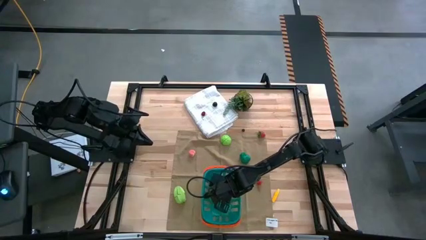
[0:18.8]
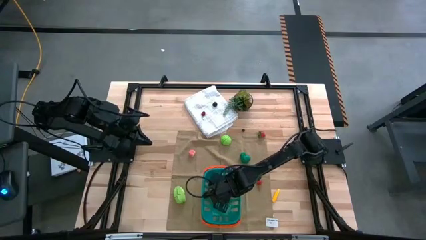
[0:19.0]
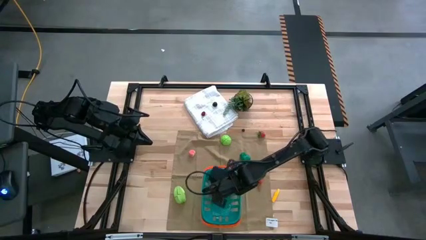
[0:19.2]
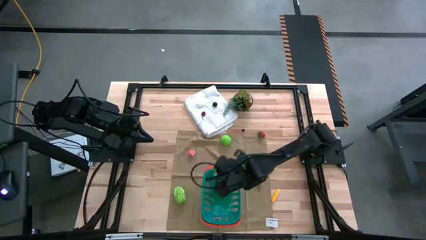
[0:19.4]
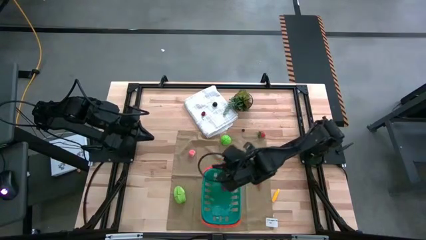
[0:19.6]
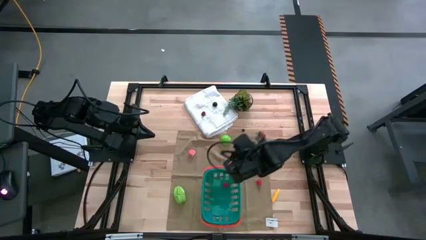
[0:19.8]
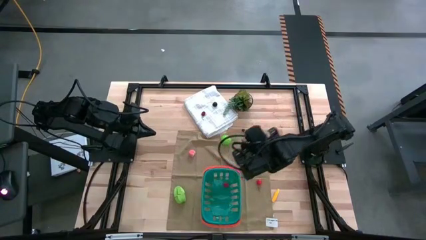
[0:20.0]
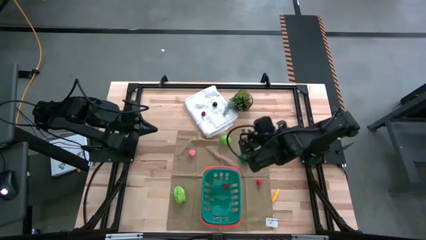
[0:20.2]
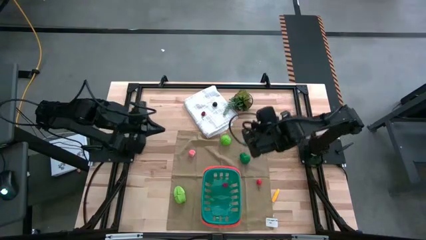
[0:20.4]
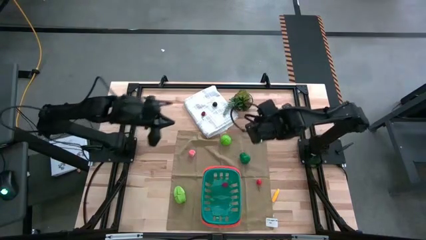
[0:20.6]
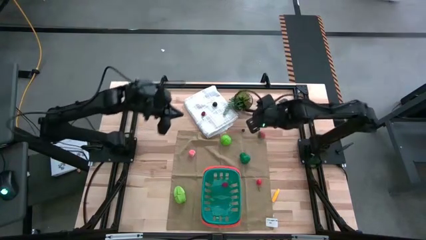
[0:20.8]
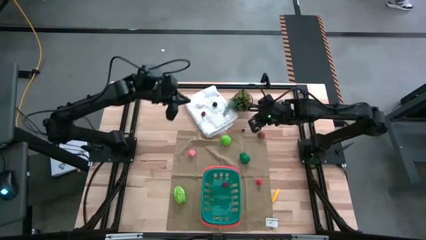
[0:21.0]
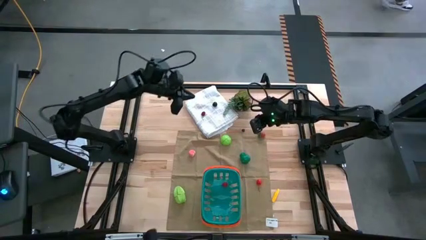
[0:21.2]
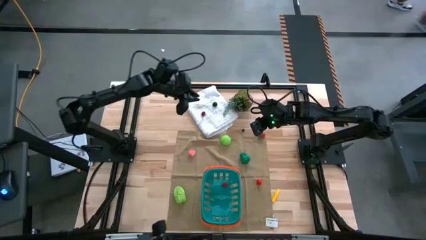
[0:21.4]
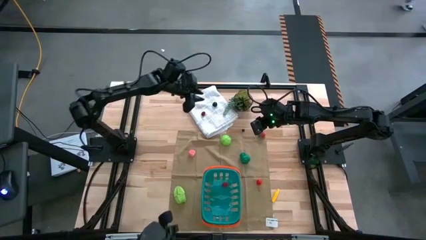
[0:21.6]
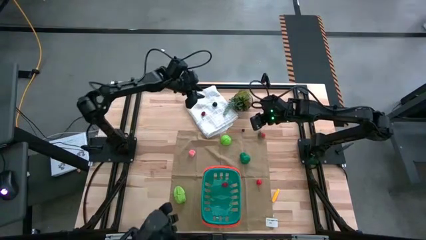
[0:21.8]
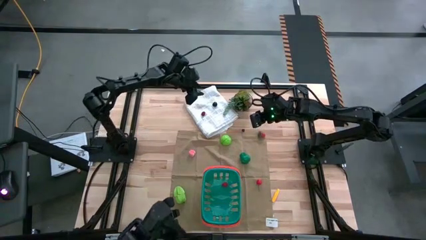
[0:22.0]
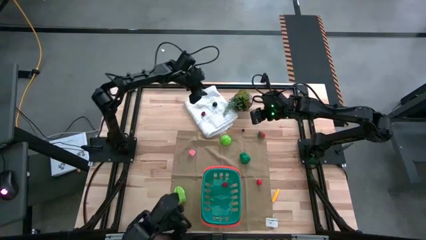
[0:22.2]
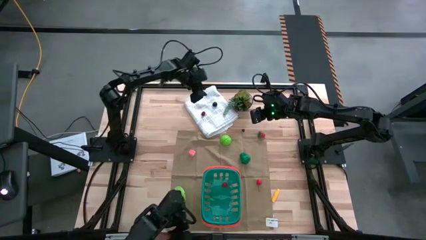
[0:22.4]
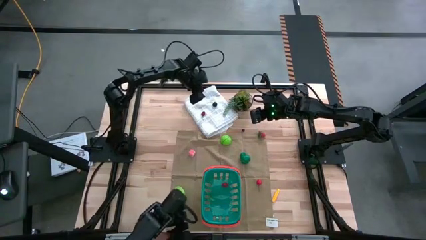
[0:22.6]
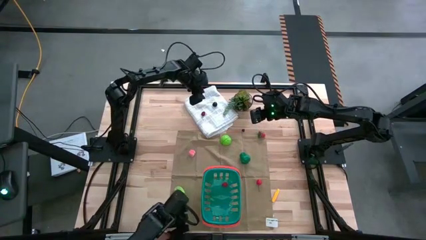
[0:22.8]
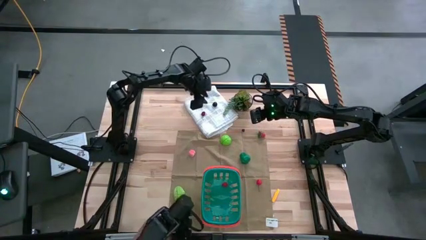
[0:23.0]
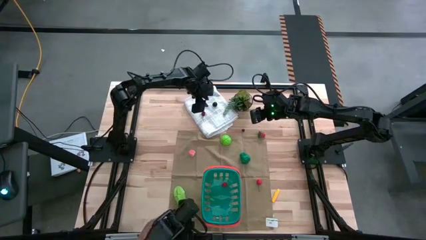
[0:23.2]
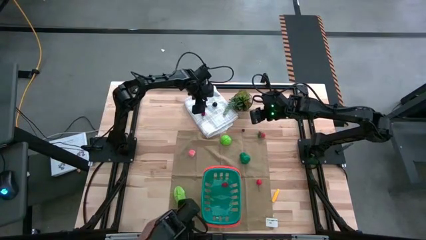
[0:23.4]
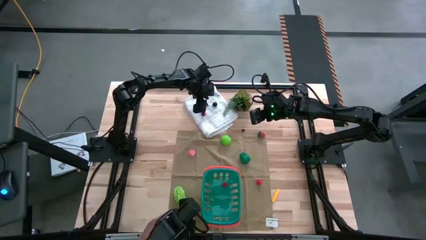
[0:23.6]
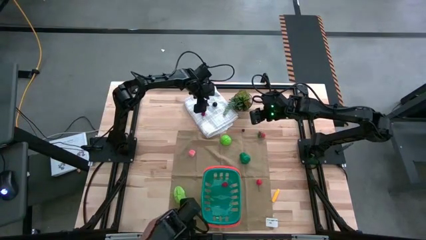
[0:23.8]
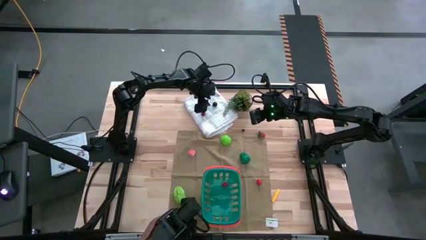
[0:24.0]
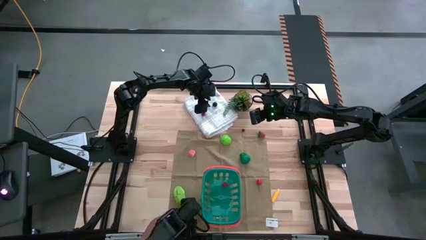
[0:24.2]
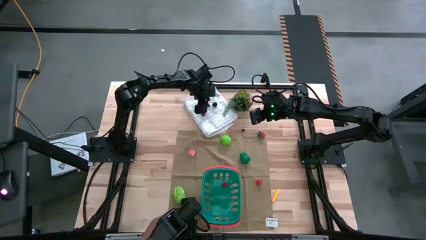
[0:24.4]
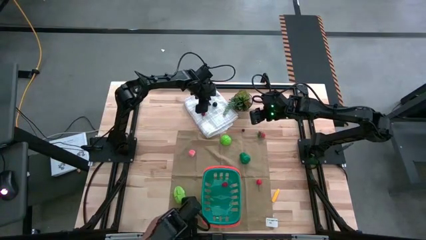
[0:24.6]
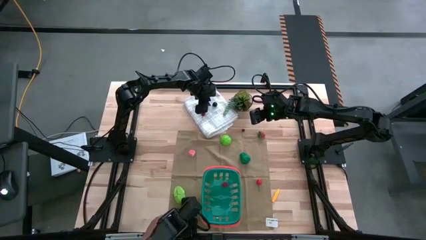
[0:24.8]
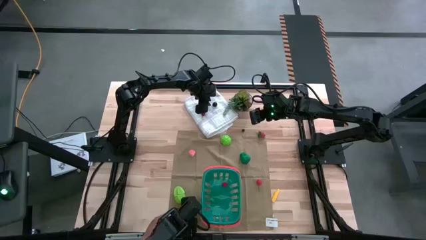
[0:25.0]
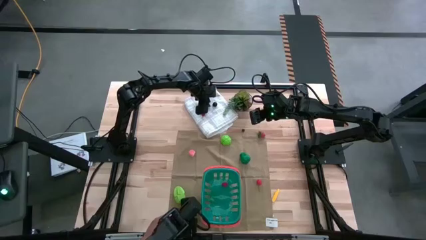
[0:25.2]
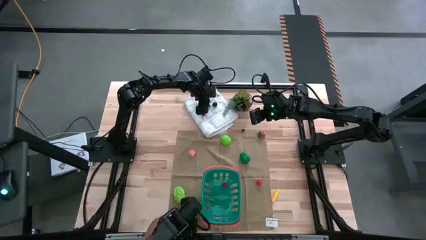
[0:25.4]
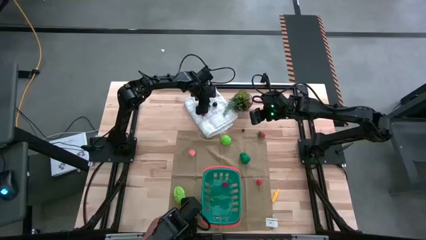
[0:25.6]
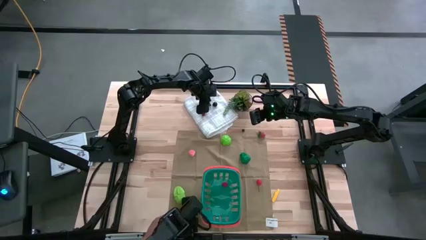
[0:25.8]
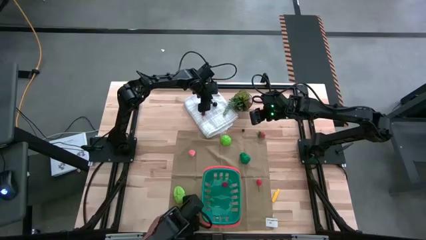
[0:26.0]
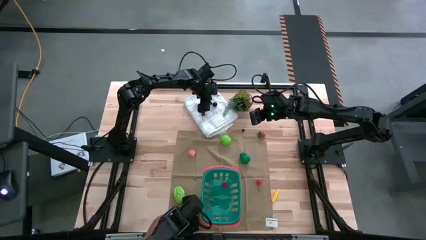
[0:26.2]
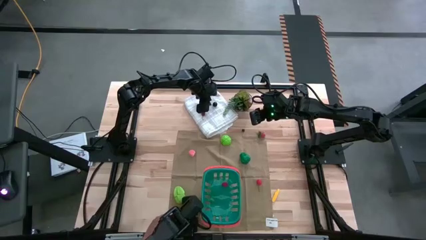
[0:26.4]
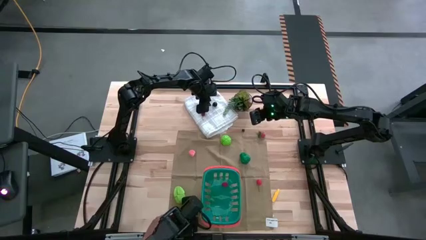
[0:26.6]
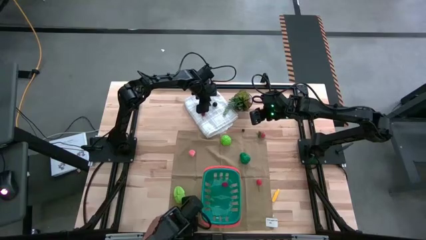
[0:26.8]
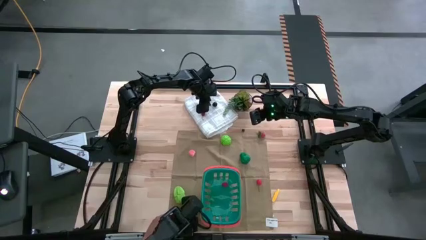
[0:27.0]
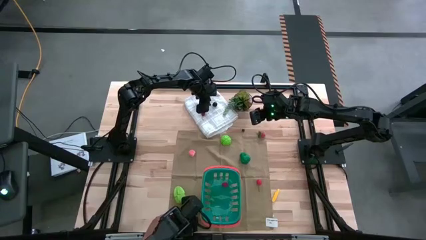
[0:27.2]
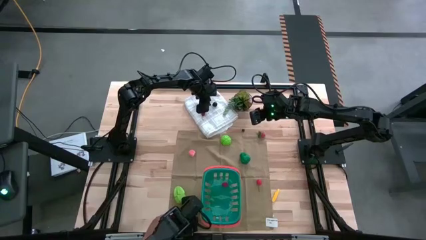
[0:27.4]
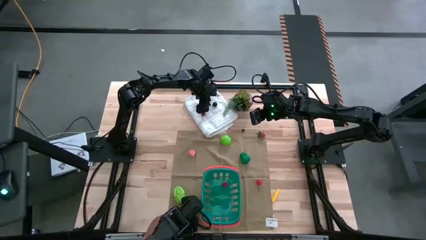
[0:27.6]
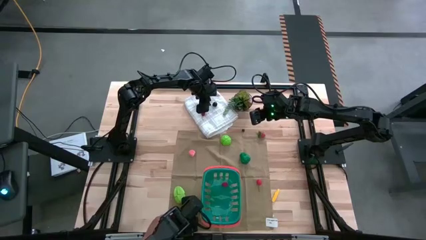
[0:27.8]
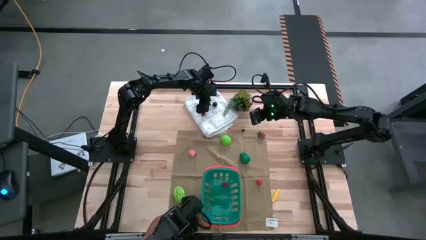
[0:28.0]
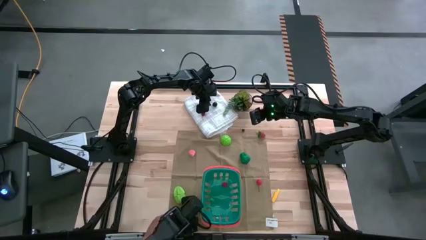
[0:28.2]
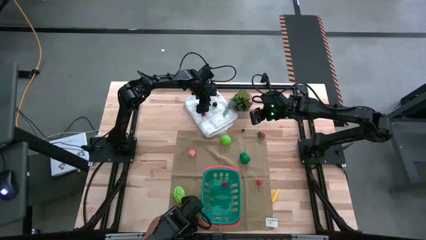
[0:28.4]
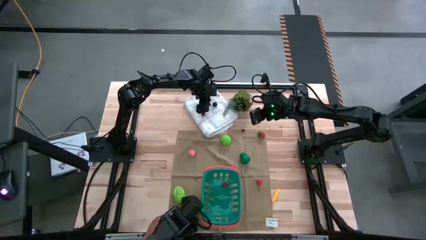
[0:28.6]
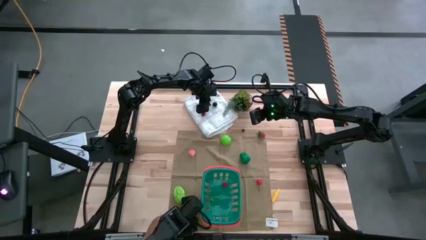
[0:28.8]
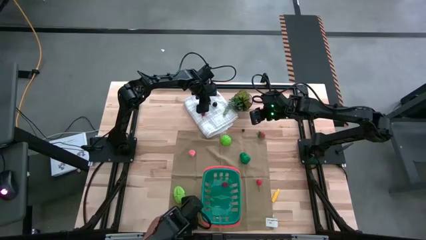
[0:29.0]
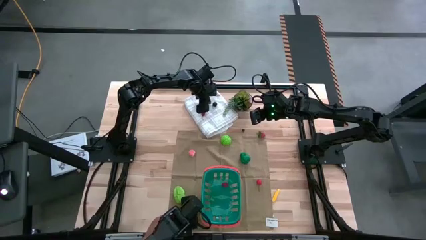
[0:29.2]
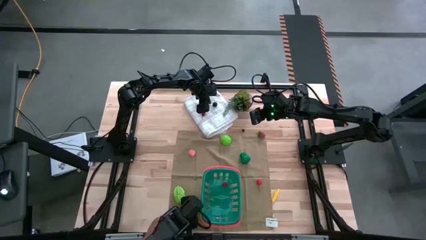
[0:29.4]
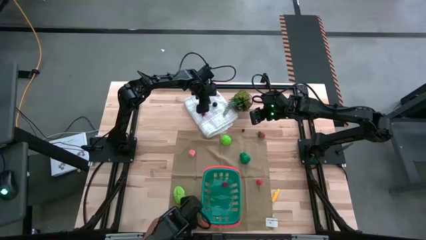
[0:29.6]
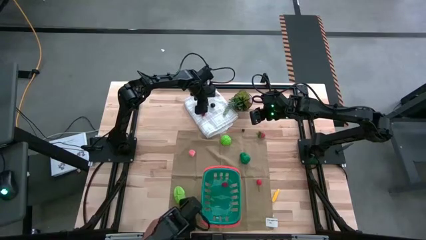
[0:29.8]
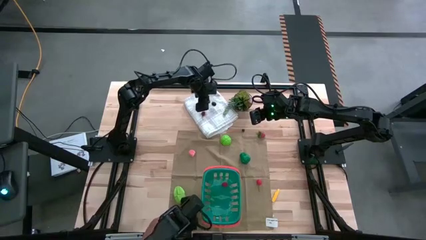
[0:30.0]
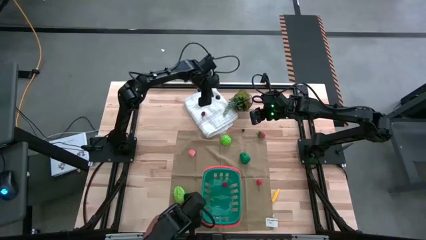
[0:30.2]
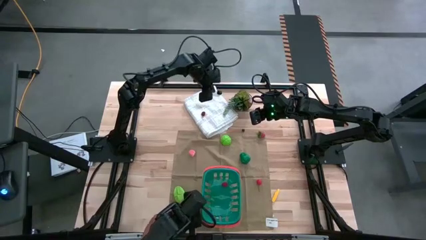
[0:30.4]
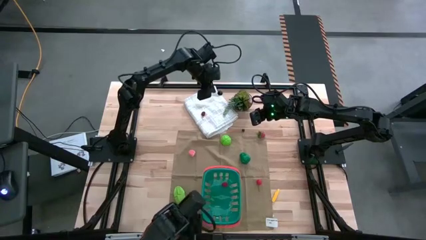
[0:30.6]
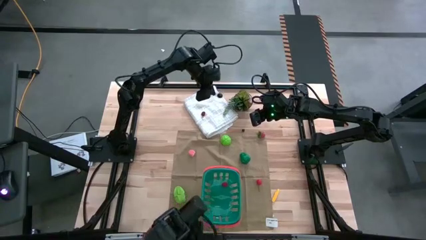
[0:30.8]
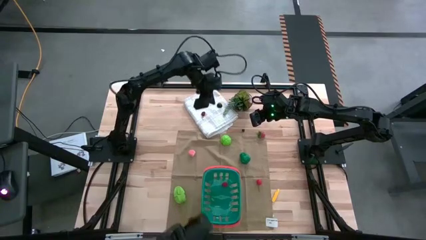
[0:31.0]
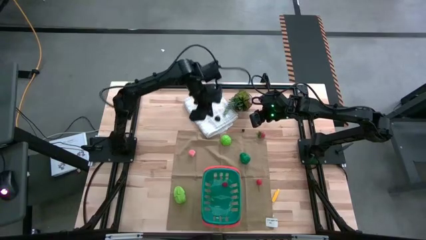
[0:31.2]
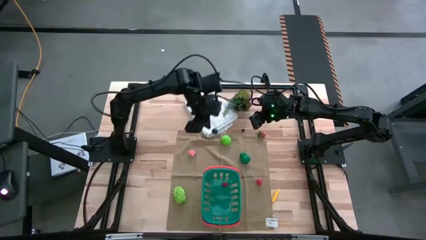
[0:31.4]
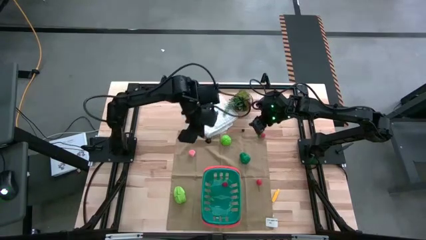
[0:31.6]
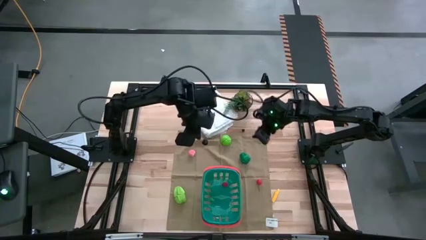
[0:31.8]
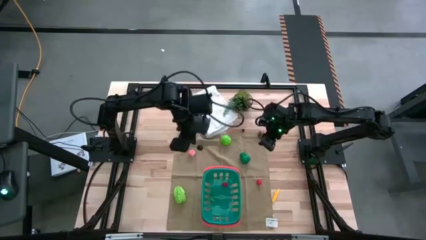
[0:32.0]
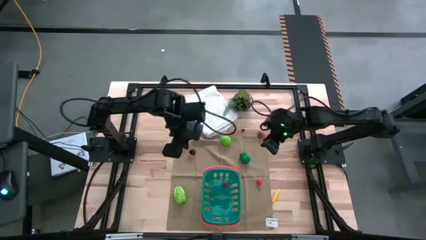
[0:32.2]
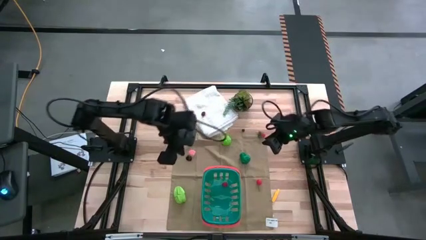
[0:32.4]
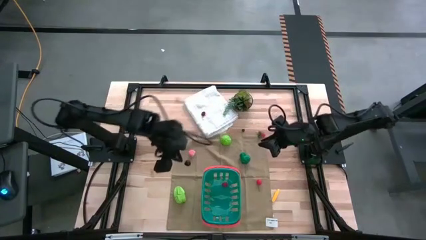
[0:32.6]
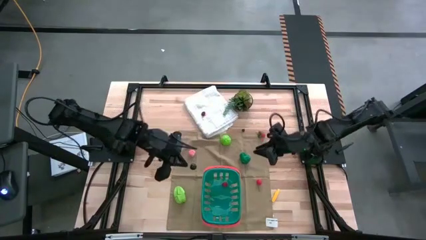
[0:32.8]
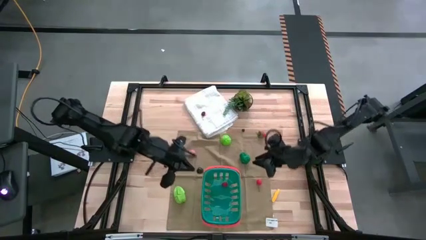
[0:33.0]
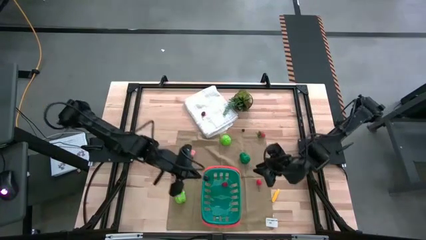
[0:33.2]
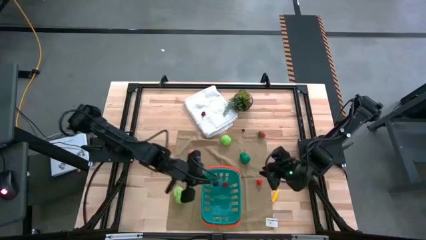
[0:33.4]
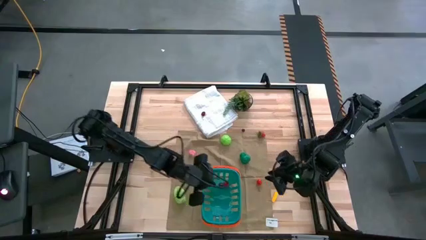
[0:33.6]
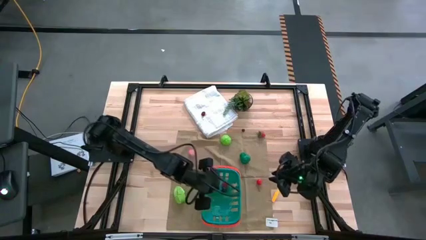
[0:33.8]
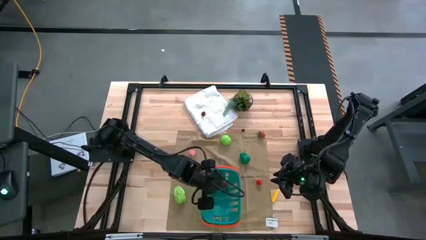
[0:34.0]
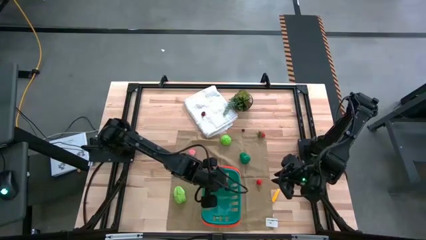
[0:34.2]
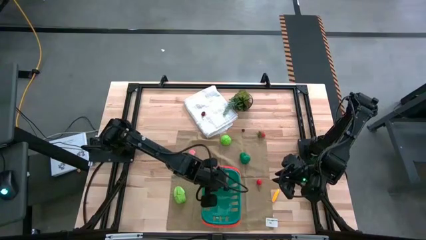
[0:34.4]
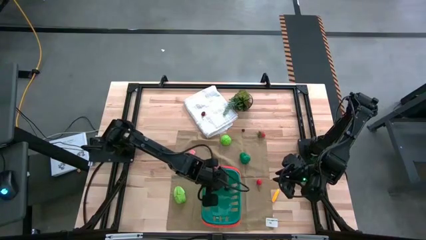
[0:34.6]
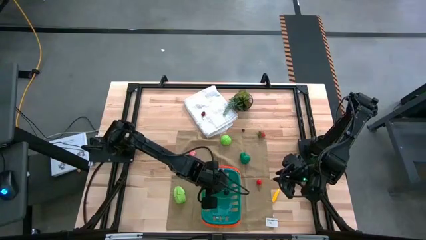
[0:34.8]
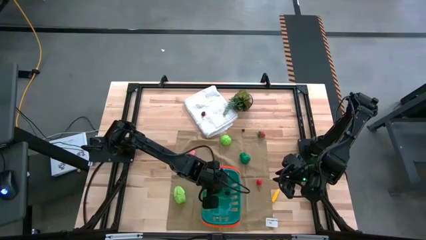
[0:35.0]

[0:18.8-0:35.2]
Task: Pick and placing Produce into tupperware
Put the black cherry into the blue bin
